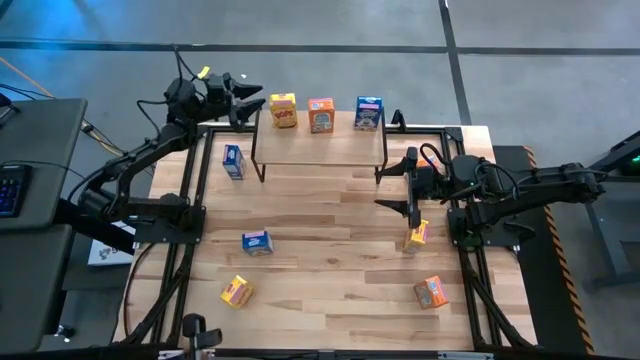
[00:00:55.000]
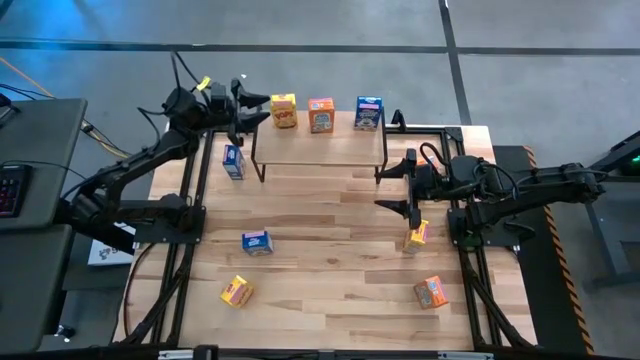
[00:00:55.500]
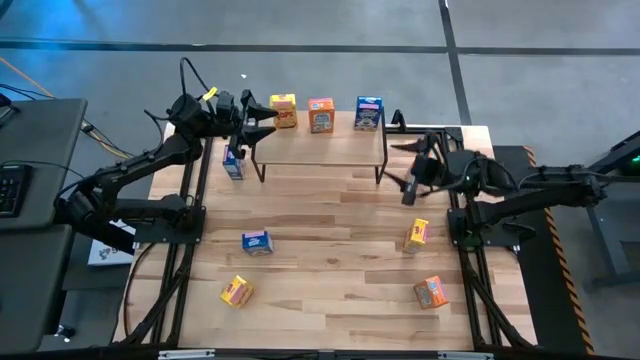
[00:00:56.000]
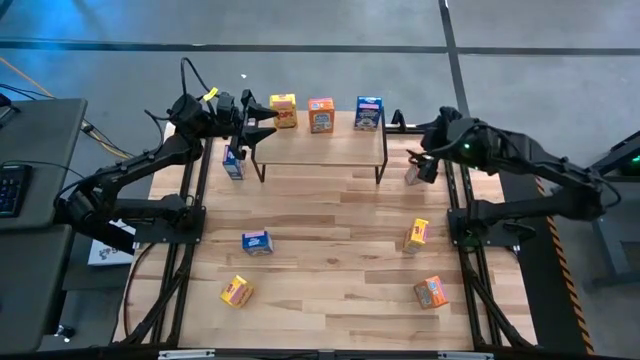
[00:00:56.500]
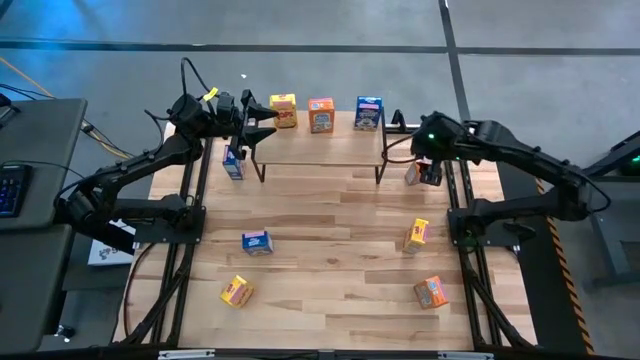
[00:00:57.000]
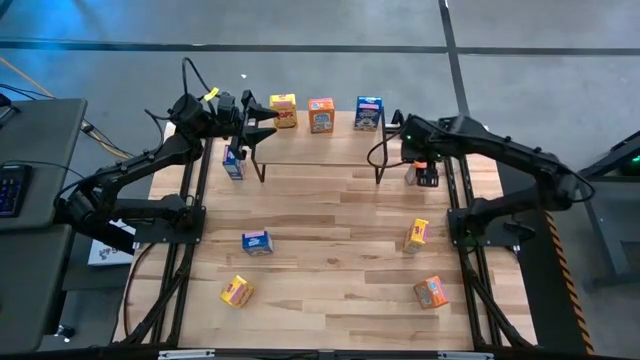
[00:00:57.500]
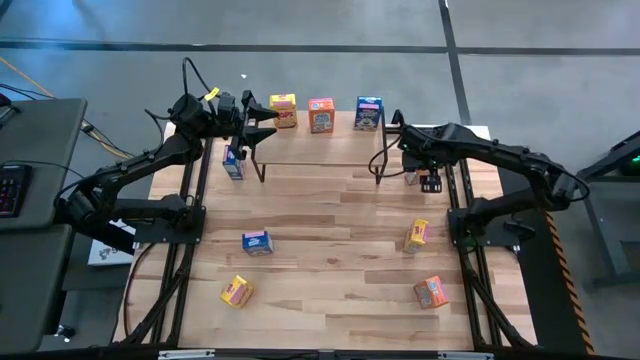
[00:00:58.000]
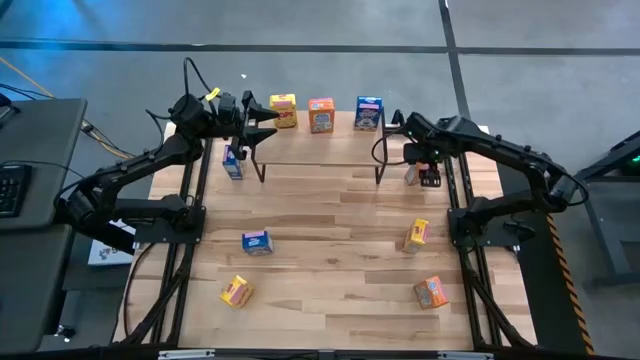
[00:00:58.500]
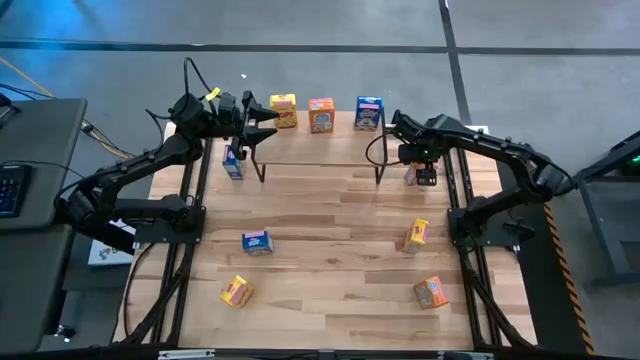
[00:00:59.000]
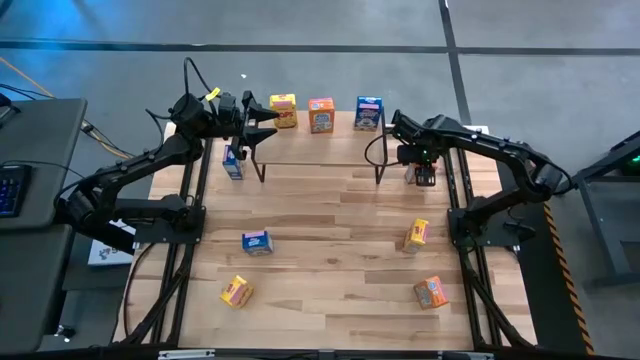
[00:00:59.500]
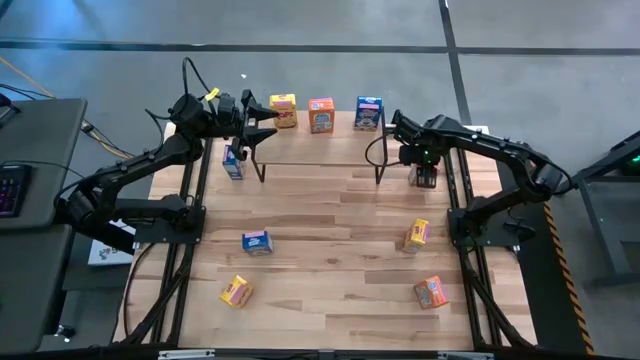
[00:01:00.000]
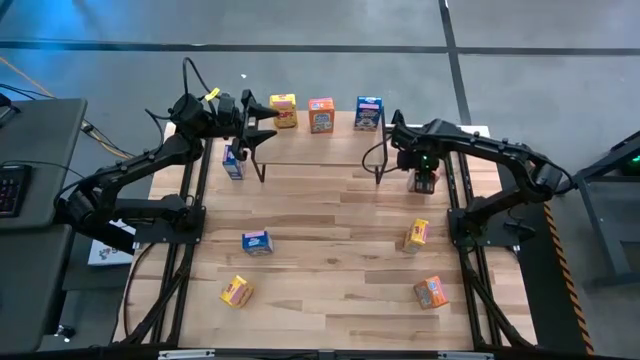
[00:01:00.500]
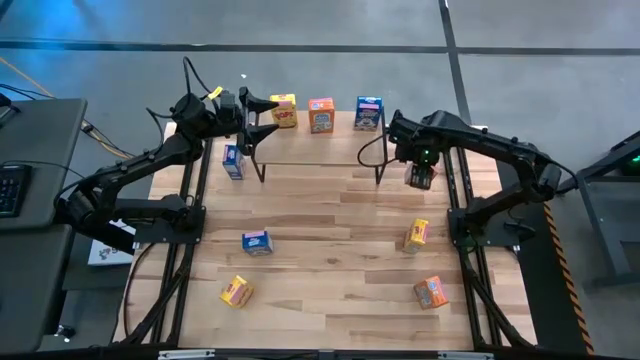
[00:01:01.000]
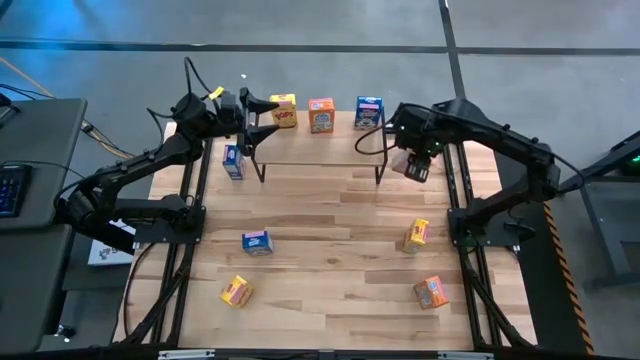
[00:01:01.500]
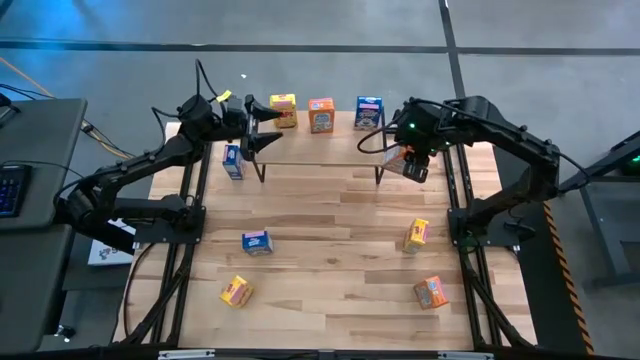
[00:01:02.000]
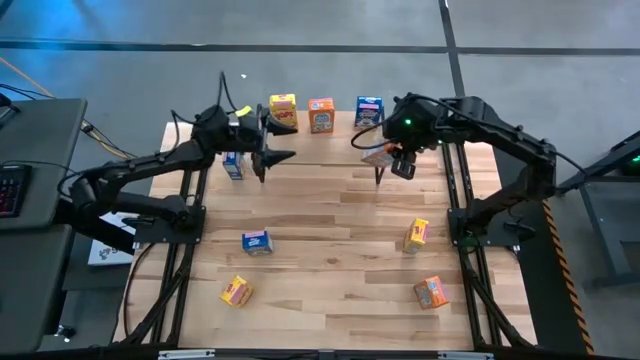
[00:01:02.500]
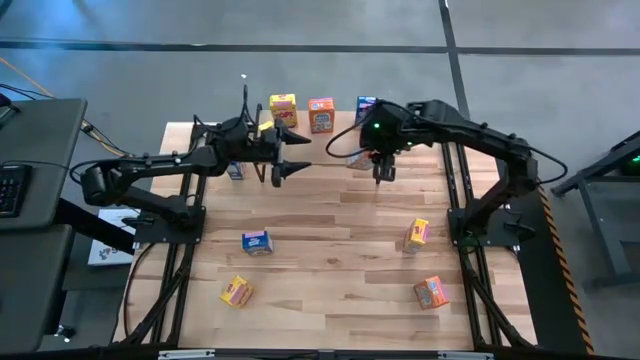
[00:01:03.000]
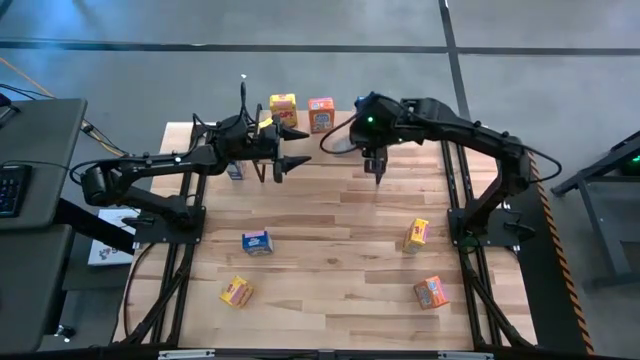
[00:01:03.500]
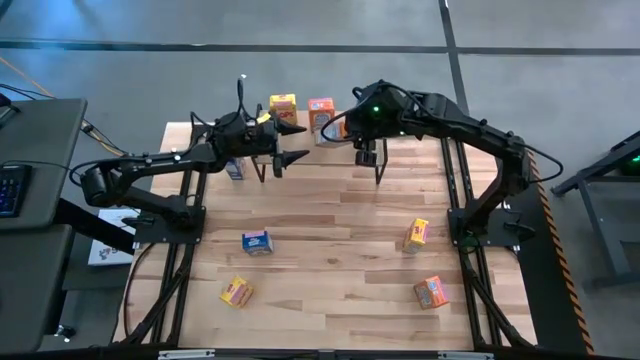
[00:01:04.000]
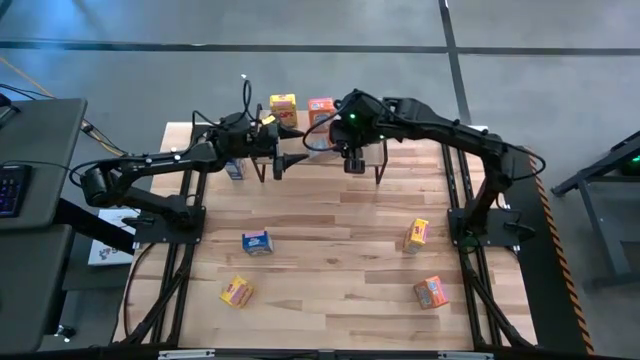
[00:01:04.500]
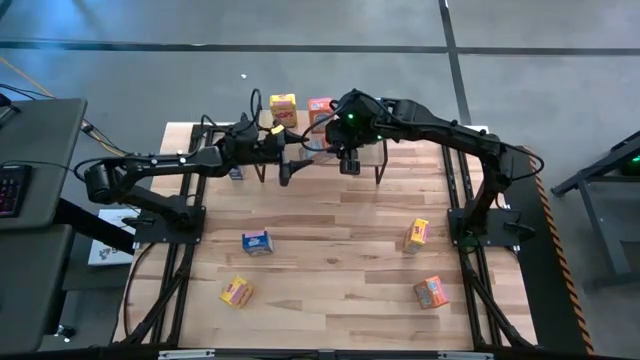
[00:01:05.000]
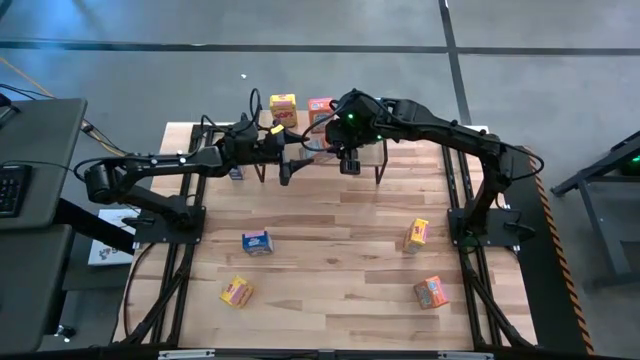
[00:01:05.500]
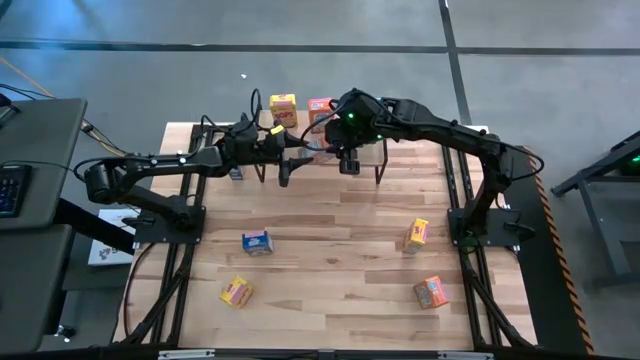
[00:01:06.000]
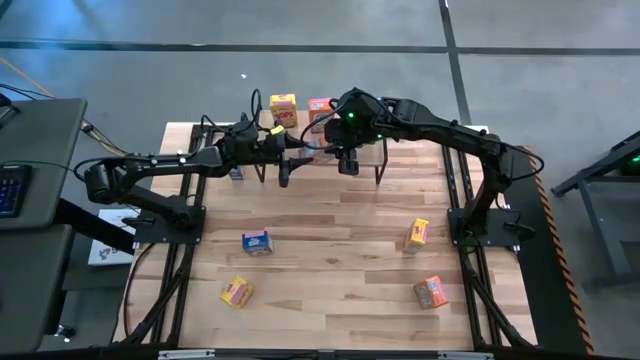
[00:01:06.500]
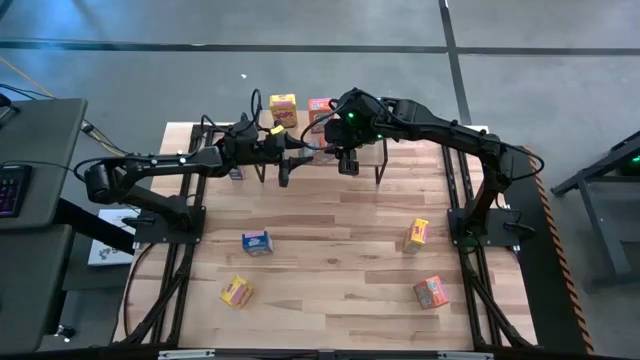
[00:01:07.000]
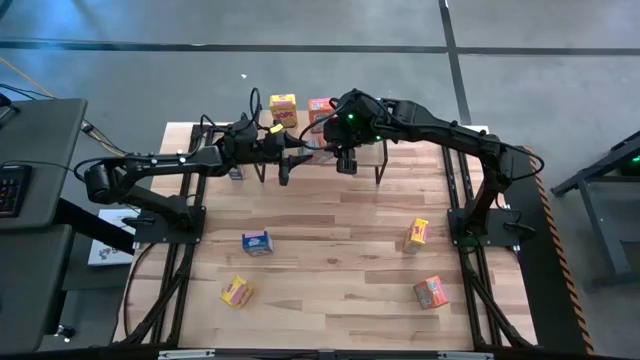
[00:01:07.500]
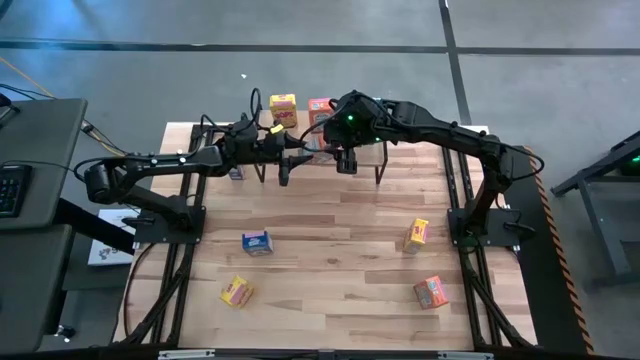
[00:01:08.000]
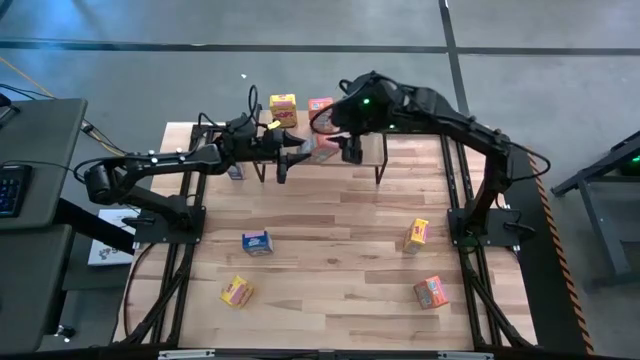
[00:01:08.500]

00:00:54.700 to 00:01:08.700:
Task: Stack cereal on shelf
Put the top orange cereal box on the shelf aligned with the other orange cereal box
